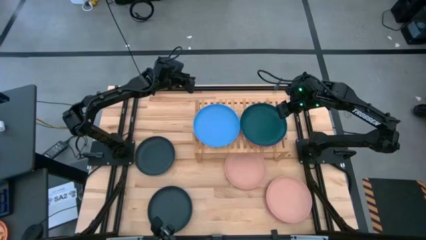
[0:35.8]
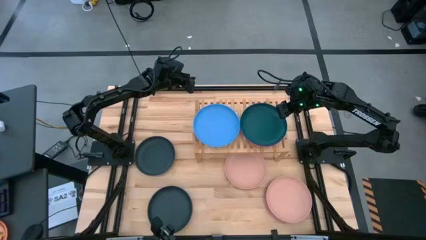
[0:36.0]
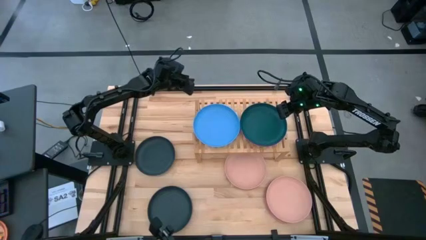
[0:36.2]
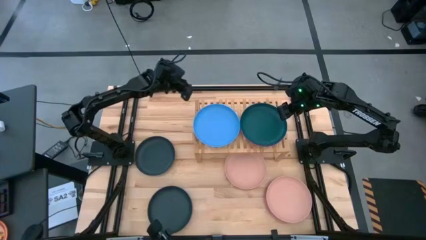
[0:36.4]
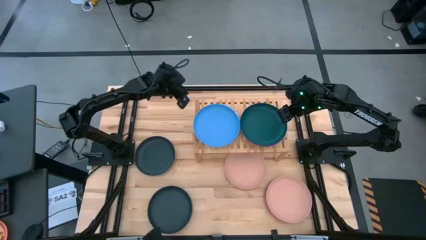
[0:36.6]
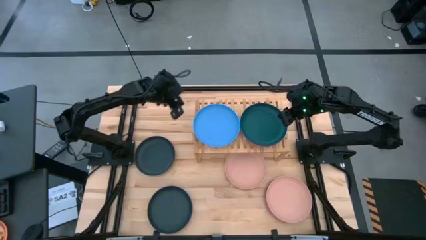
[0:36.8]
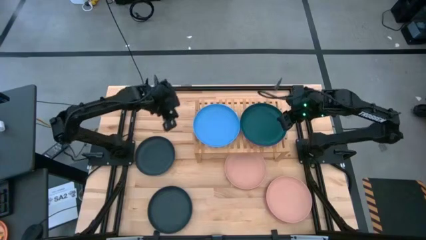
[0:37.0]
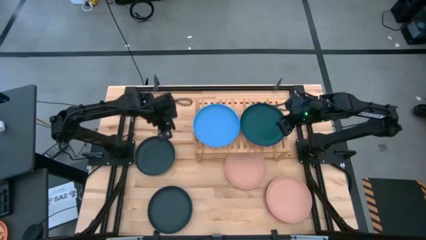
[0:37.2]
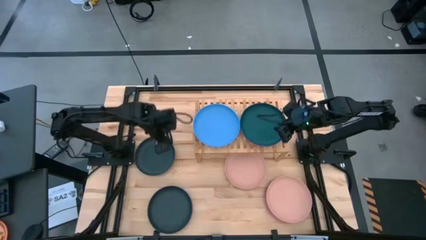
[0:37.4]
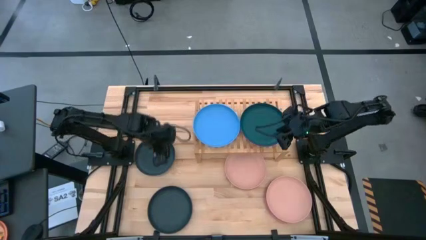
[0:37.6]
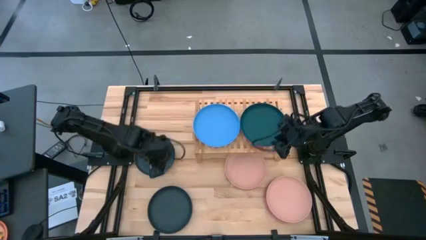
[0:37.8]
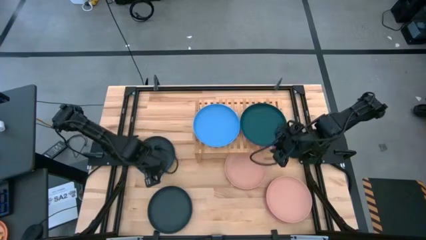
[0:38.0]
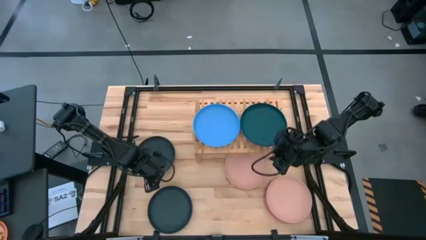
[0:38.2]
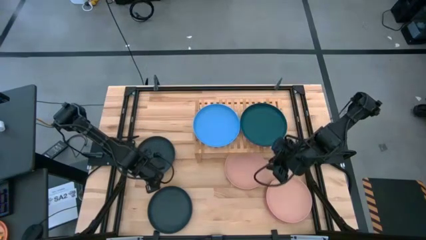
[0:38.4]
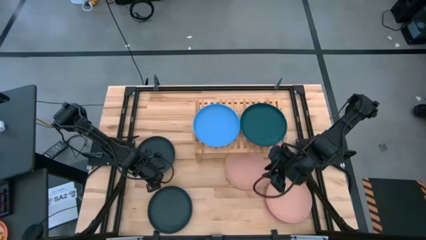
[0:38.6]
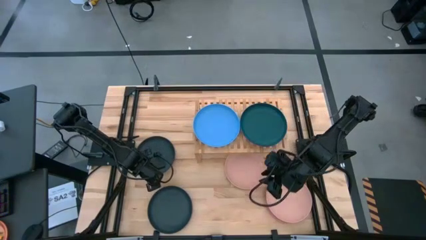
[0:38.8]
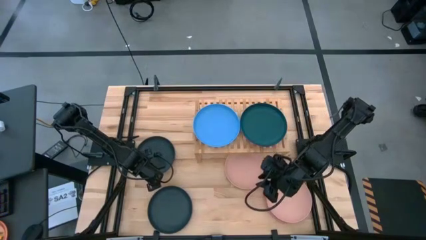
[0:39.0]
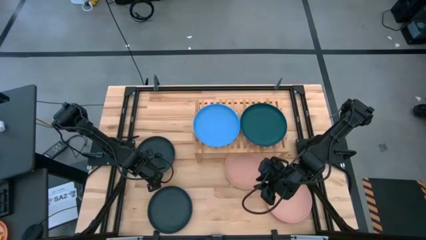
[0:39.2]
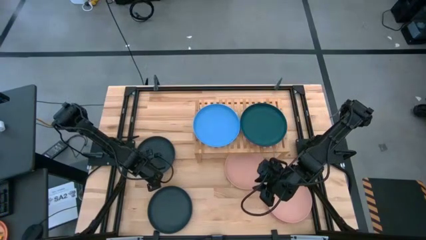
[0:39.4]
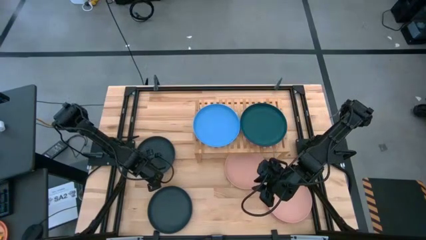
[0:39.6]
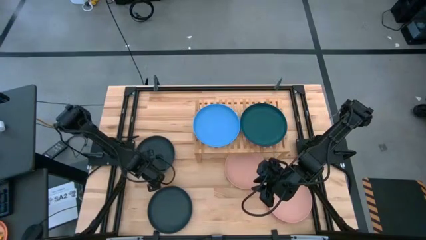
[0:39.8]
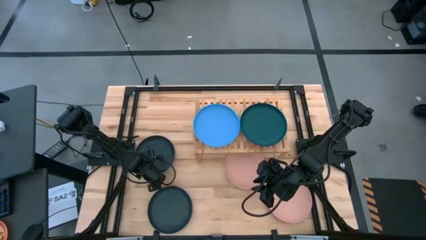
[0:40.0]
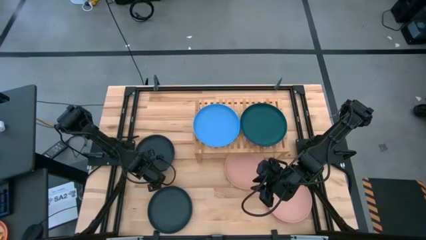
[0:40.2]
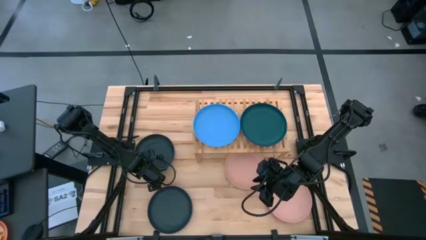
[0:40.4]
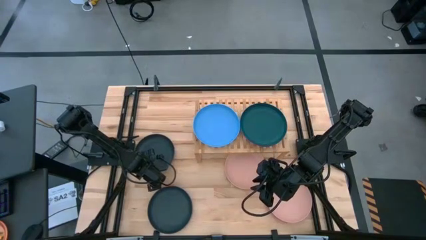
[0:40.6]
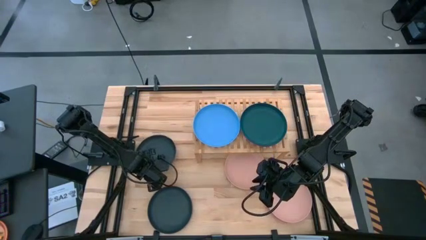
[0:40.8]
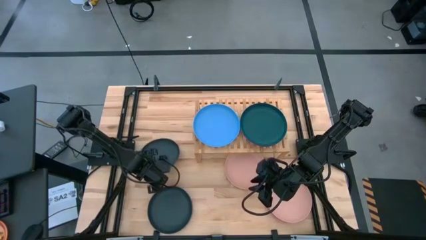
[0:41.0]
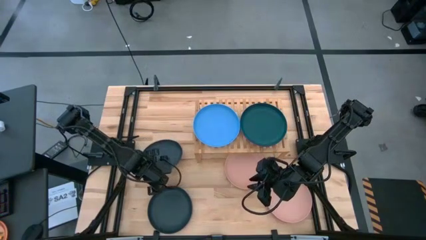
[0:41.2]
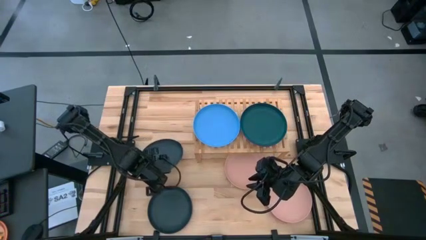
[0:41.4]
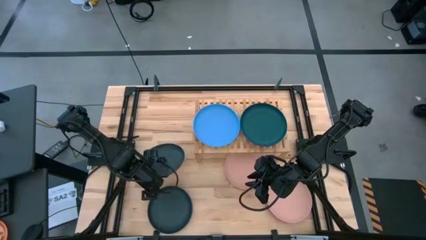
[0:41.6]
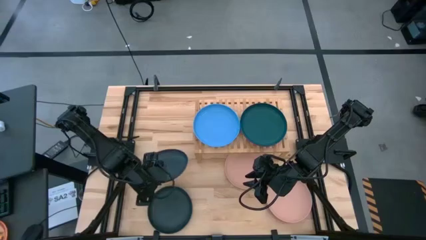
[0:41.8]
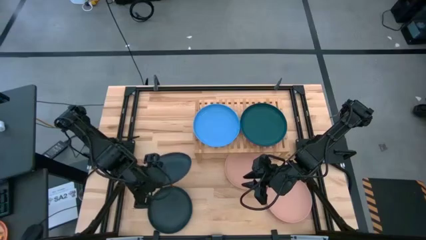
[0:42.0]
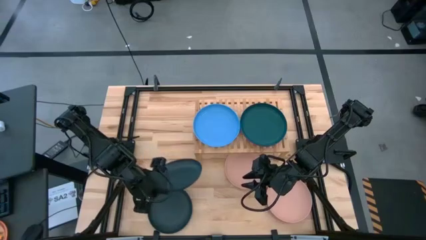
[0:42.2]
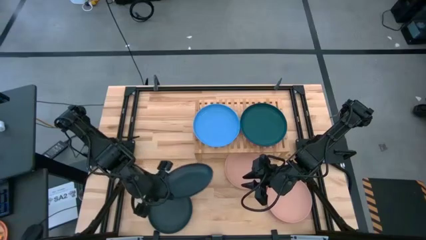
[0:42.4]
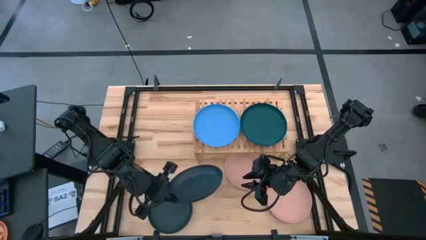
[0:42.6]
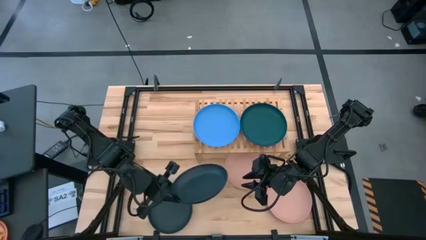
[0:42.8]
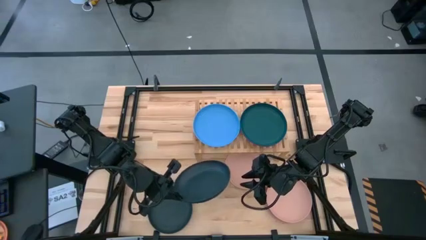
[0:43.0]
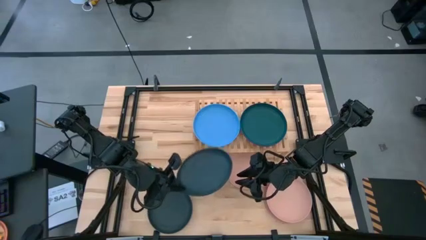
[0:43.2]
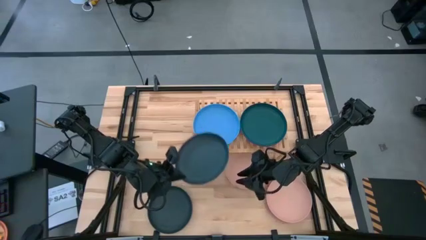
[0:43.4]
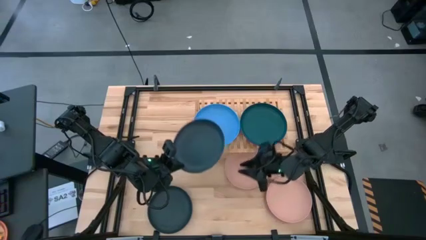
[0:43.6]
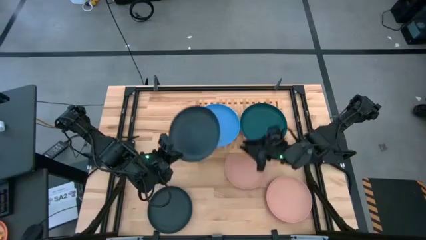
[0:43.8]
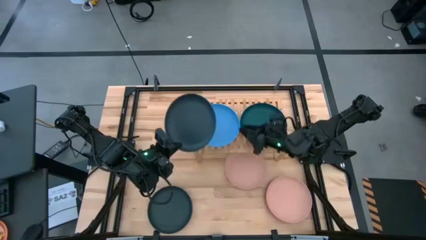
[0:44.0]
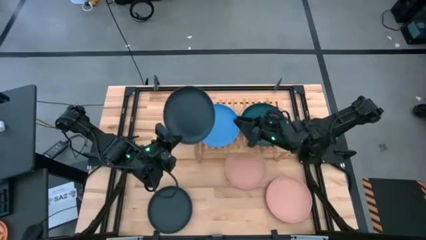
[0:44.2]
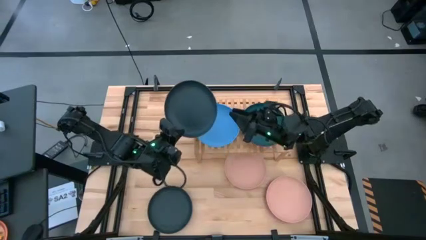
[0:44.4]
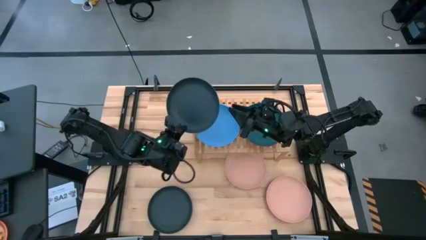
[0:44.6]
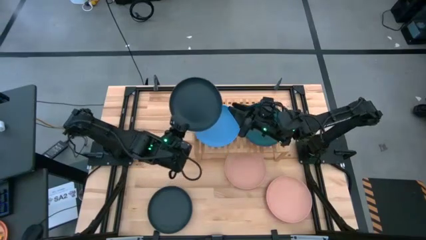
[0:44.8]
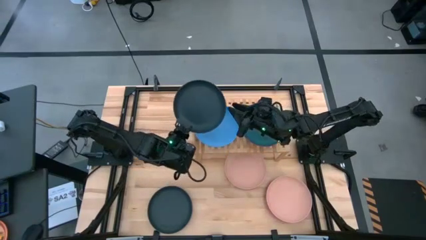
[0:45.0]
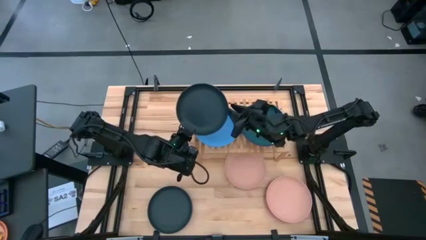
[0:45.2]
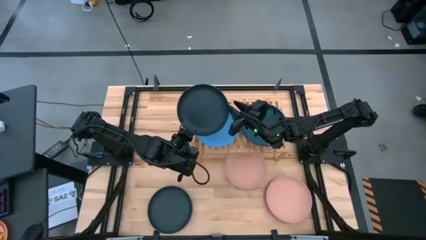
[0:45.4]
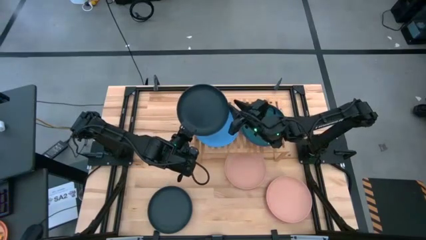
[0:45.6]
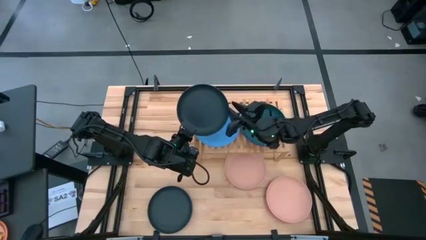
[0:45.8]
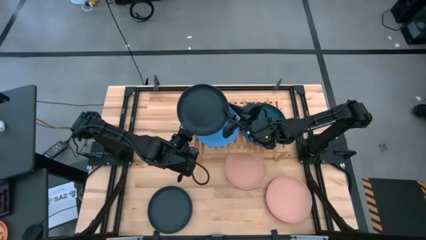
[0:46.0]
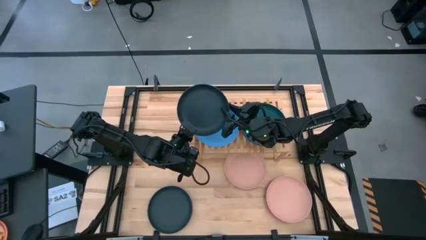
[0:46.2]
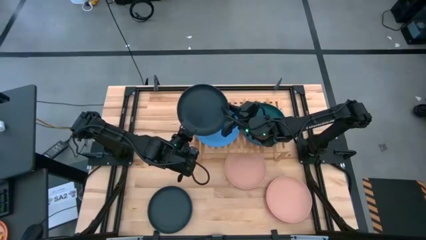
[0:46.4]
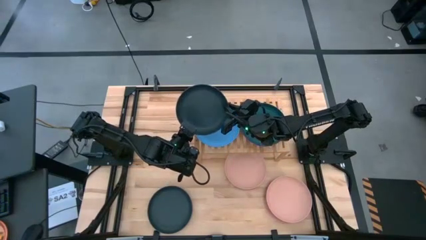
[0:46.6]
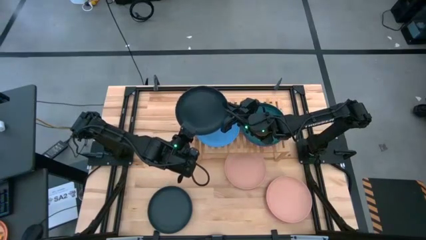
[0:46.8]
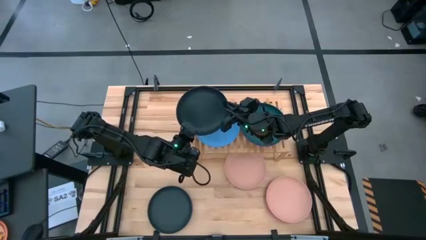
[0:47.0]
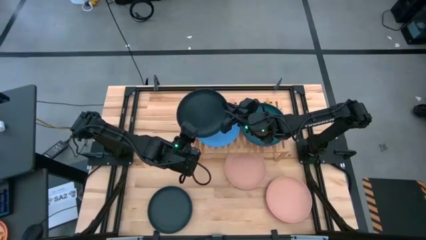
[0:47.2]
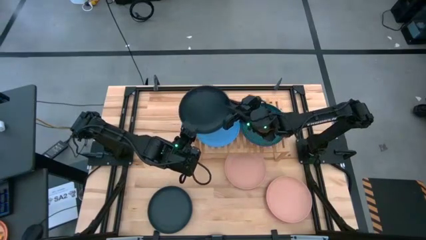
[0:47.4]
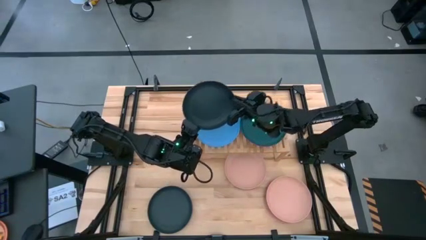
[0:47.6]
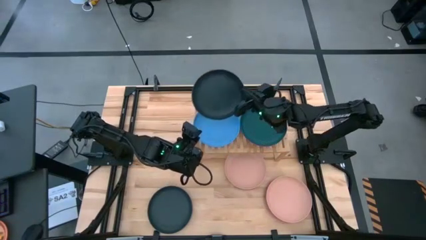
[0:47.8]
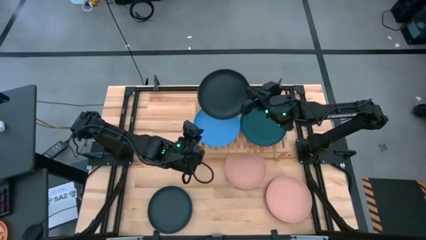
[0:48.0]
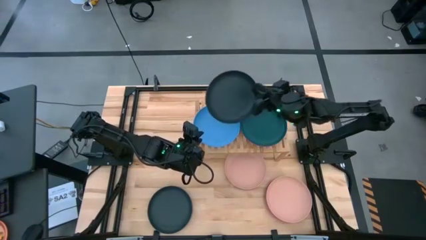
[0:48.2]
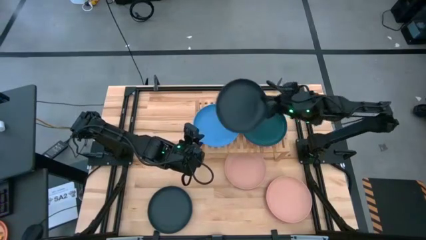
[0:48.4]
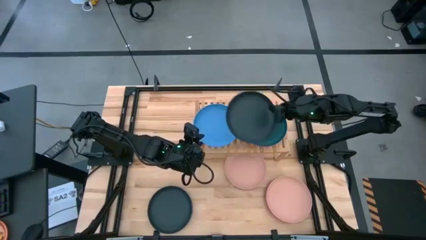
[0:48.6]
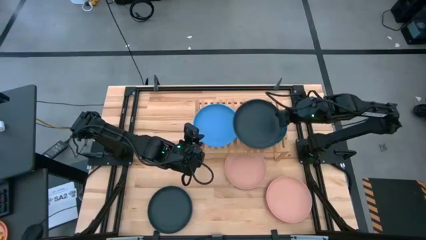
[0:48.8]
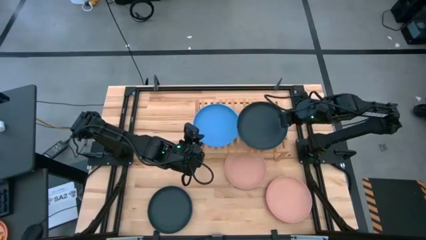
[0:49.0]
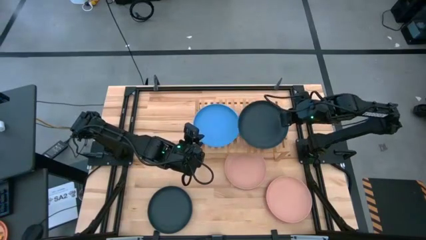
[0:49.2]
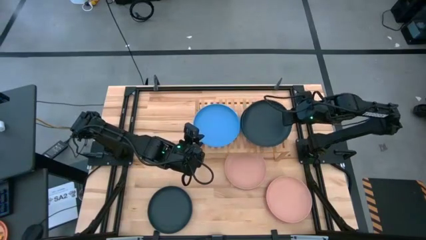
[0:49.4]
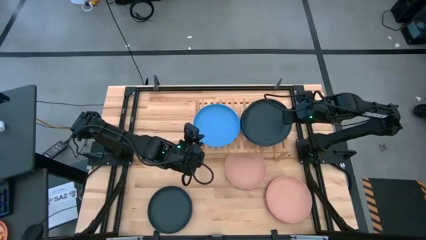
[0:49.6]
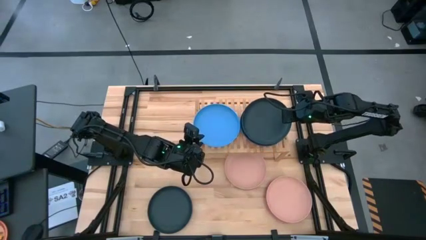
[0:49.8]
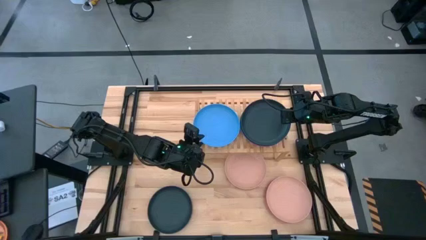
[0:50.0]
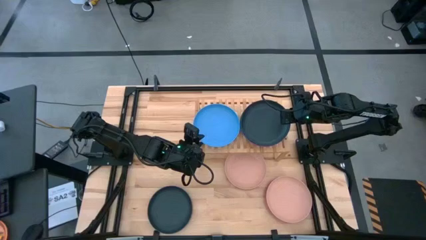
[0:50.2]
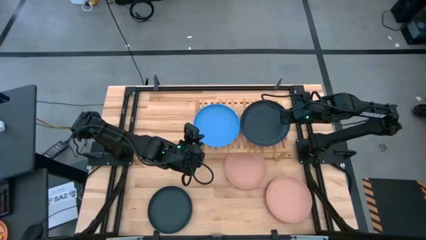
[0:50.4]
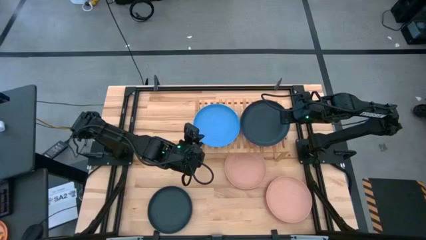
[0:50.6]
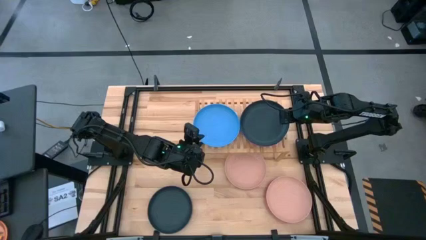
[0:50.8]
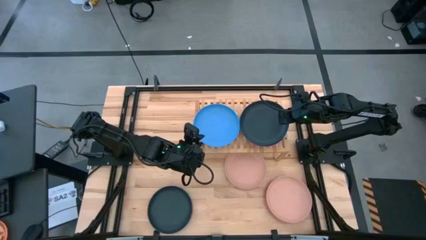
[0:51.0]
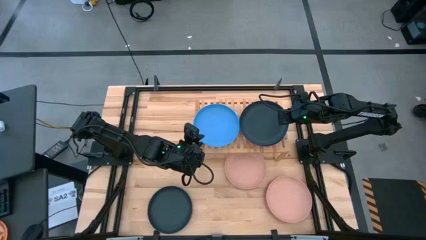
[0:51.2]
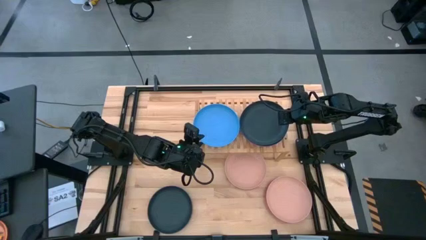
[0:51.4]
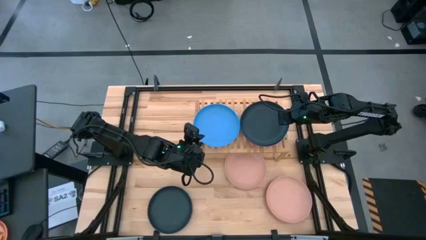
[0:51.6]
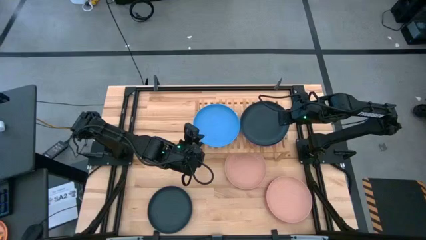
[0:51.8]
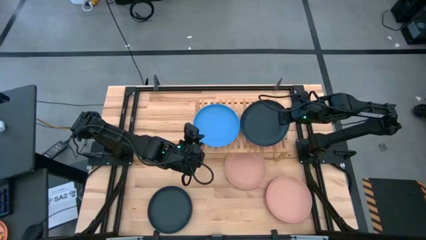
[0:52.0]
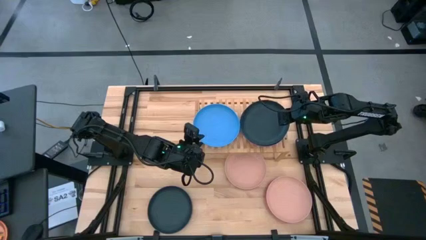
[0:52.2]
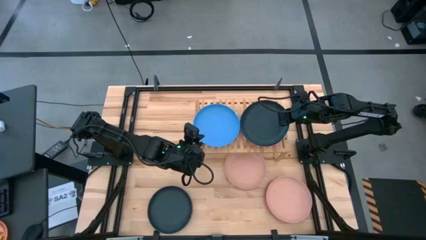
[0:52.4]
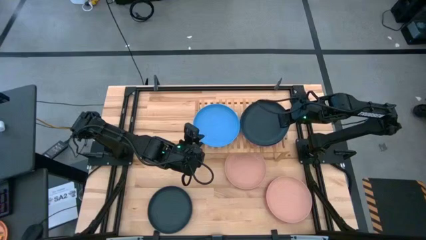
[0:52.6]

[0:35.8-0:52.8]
Task: Place and stack plates onto a shelf
Stack the top black plate on top of the green plate on the shelf
